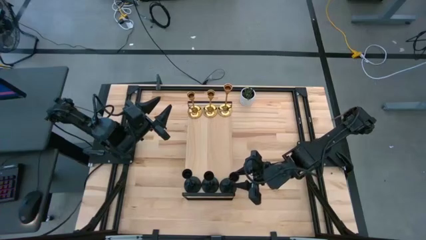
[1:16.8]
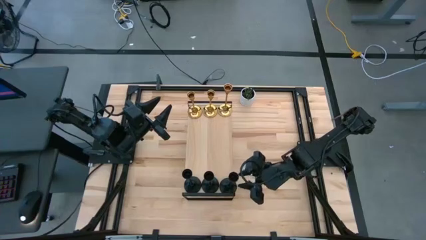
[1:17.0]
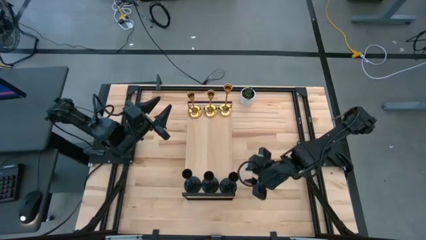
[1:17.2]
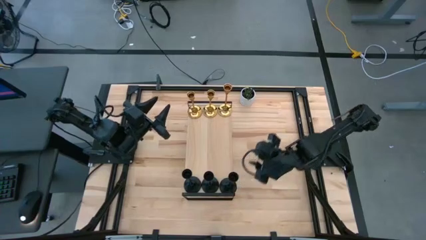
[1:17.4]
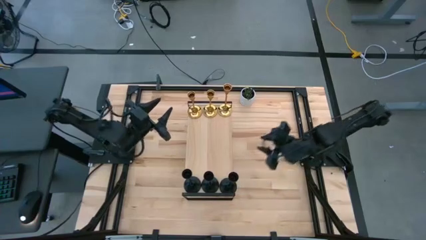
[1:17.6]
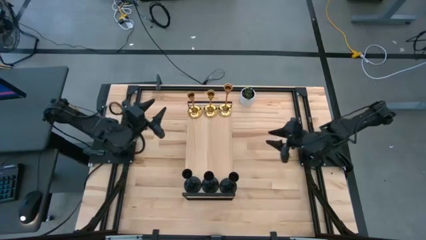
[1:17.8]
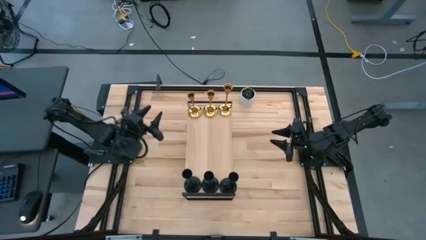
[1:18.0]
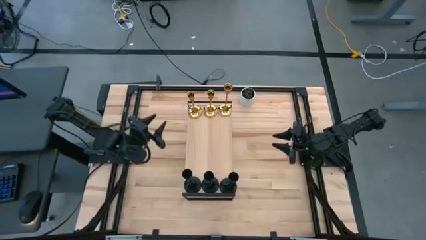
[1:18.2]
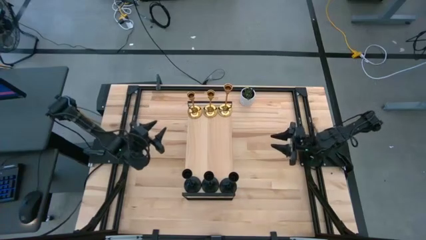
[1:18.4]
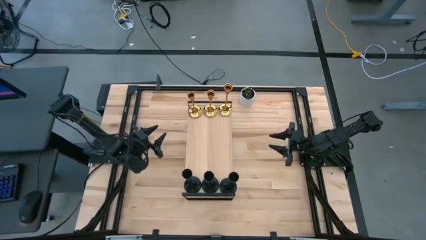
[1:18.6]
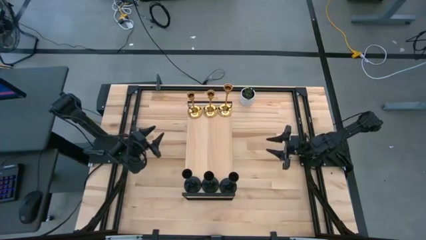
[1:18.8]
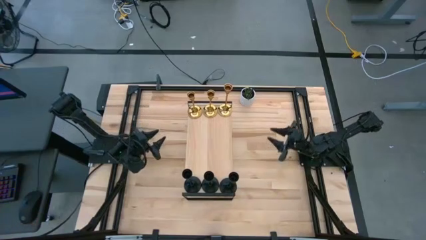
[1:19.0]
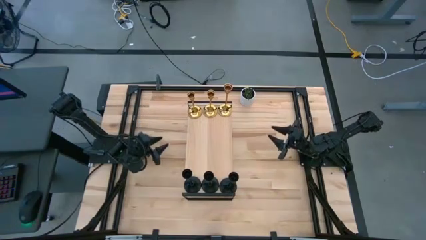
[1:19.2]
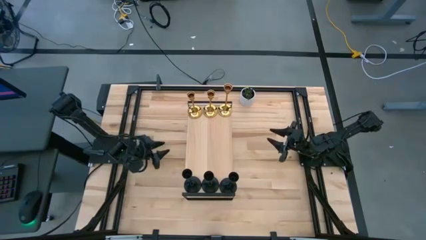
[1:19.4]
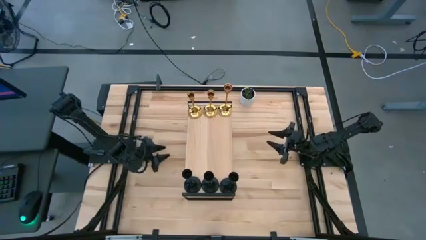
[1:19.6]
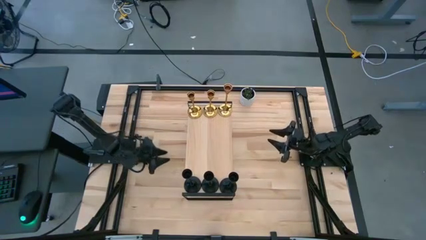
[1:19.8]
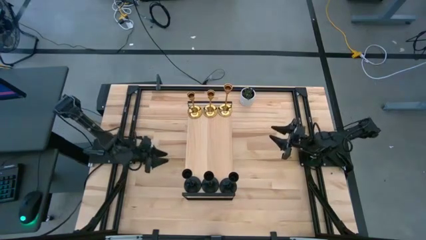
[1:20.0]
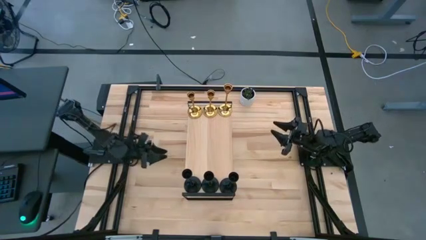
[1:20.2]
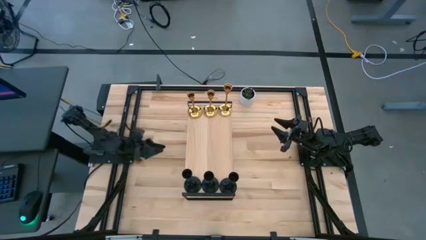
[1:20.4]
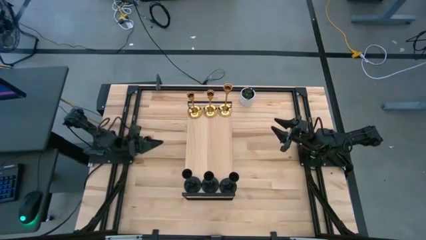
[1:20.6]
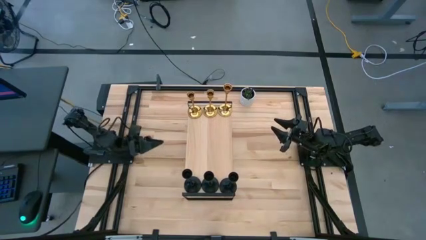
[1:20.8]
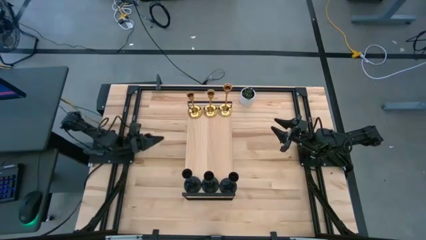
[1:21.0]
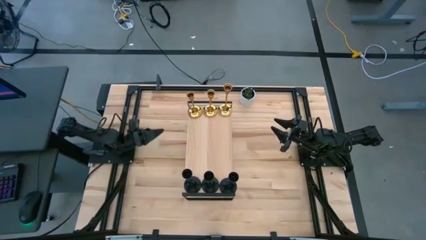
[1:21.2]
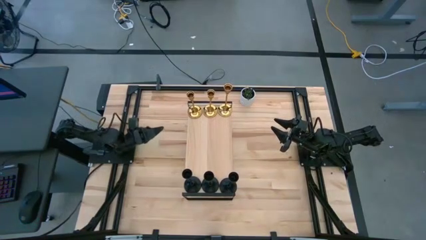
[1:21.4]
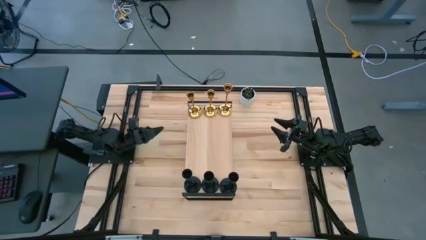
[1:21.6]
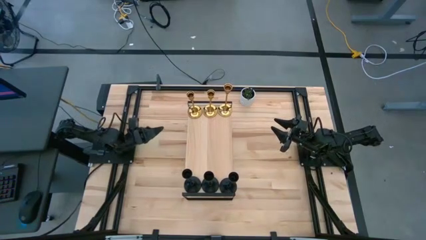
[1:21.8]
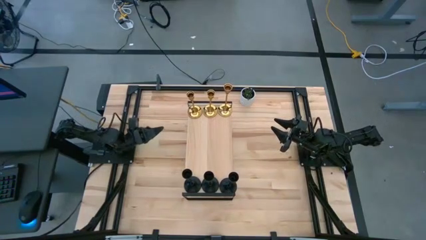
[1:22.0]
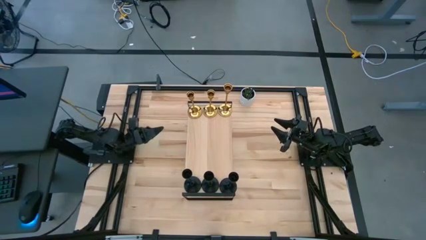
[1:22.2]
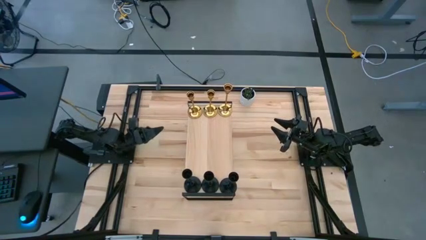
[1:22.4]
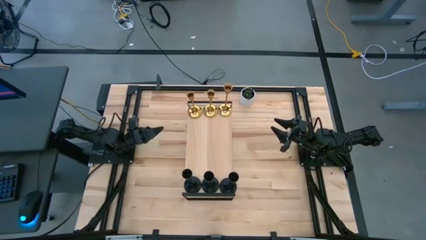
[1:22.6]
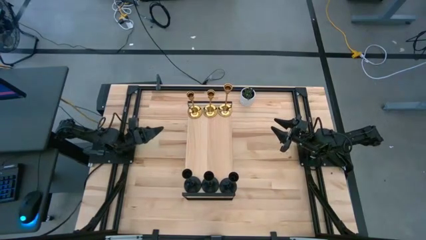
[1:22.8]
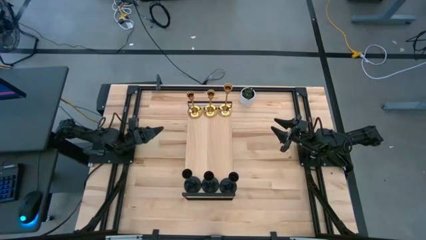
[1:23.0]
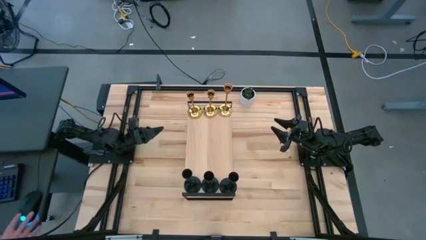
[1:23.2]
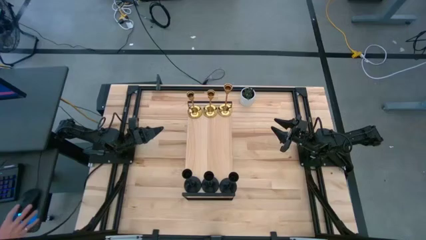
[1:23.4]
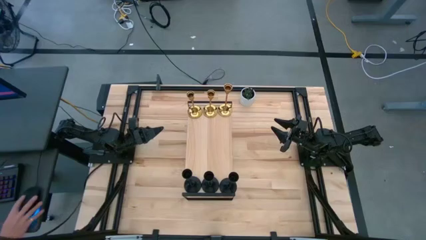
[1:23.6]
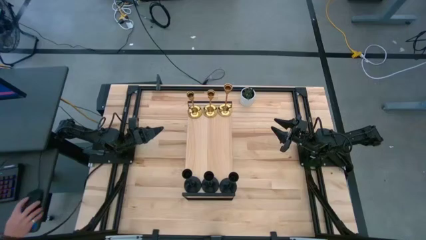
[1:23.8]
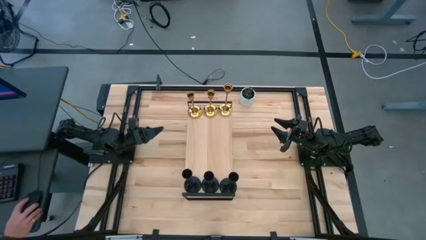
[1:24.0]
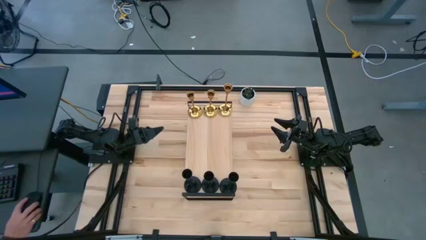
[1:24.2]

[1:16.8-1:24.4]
Task: Pick & Place candle stick holders
Return to Home Position

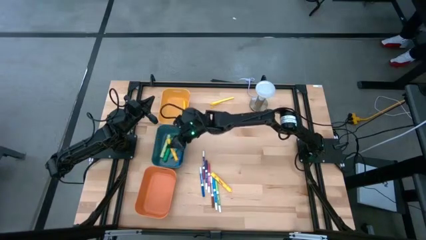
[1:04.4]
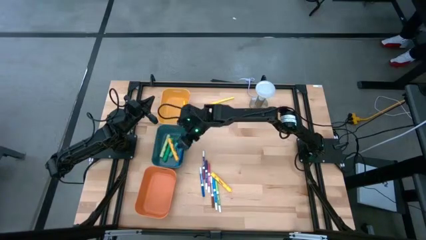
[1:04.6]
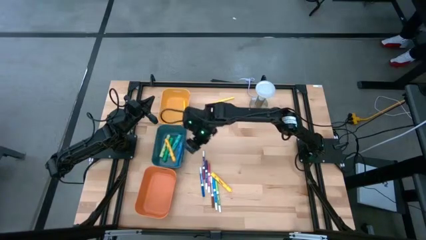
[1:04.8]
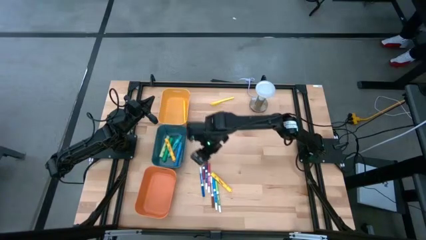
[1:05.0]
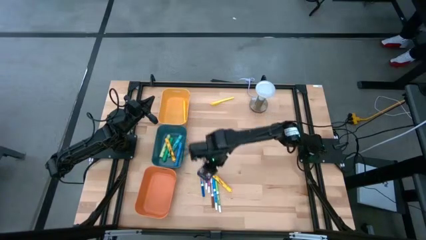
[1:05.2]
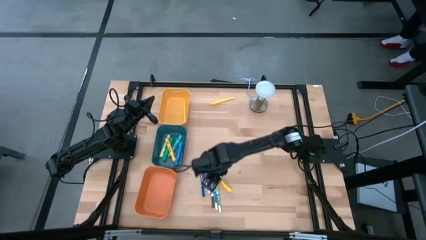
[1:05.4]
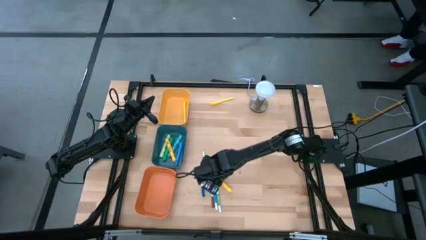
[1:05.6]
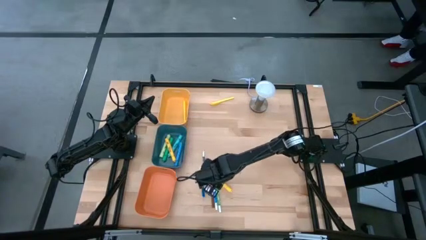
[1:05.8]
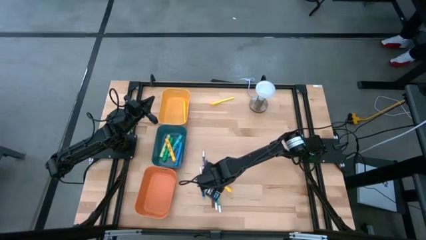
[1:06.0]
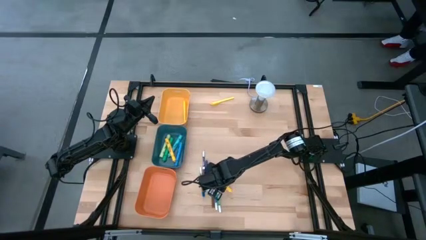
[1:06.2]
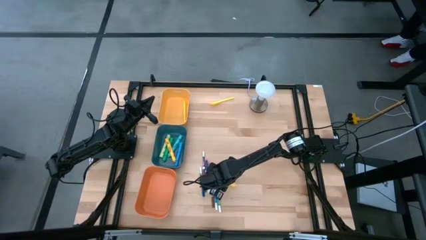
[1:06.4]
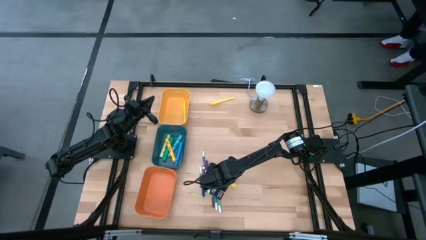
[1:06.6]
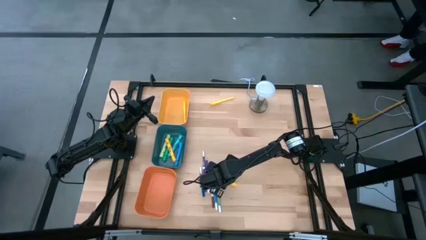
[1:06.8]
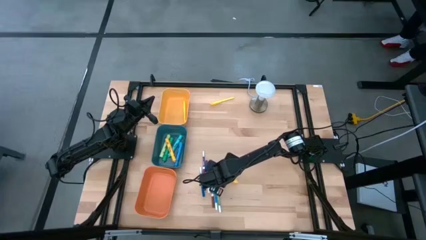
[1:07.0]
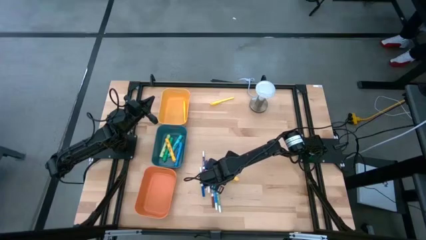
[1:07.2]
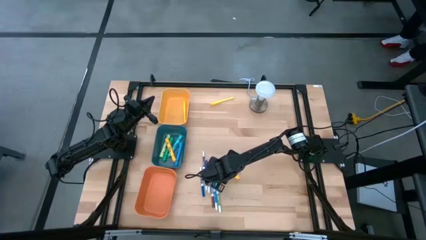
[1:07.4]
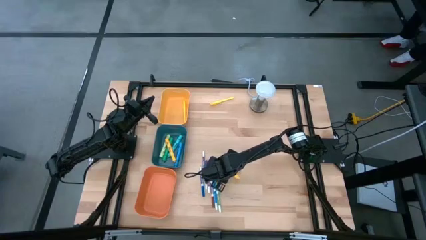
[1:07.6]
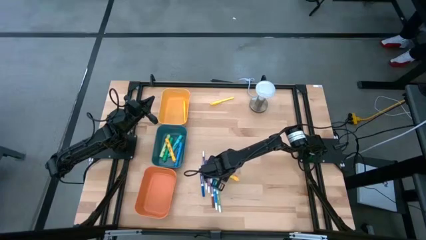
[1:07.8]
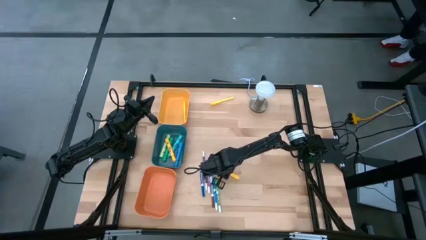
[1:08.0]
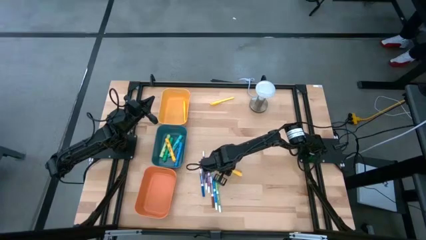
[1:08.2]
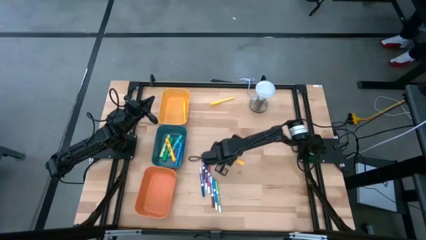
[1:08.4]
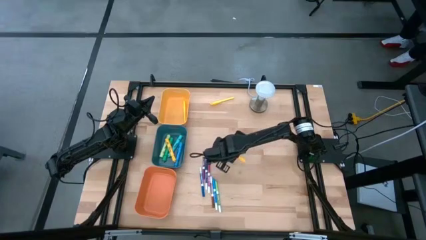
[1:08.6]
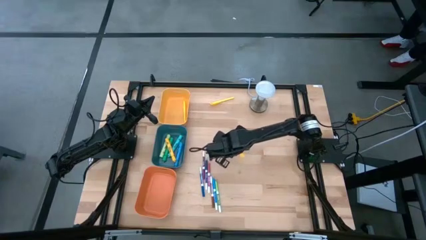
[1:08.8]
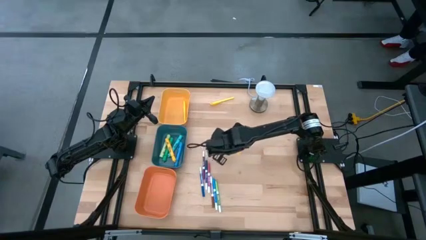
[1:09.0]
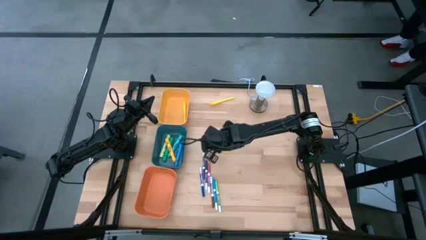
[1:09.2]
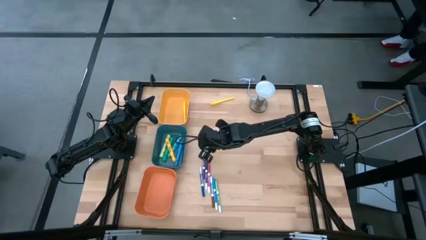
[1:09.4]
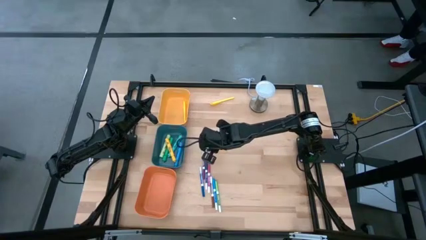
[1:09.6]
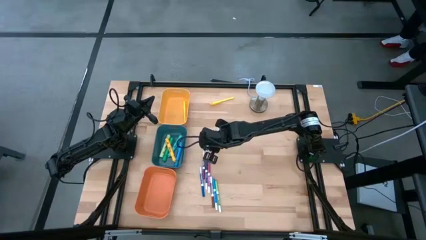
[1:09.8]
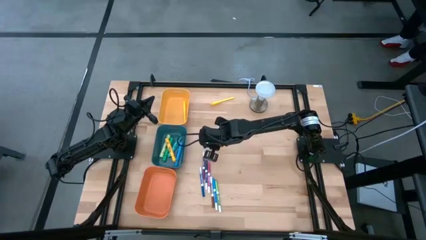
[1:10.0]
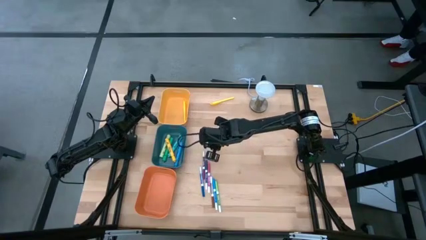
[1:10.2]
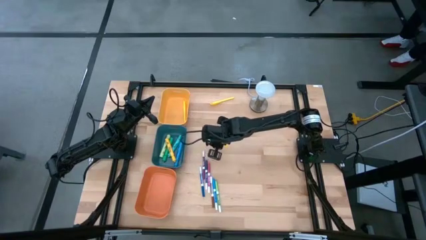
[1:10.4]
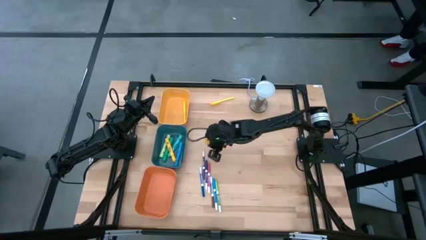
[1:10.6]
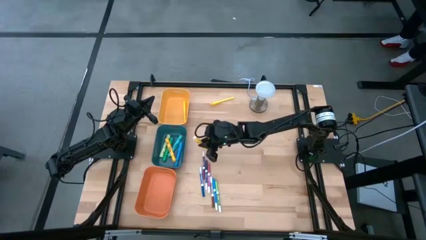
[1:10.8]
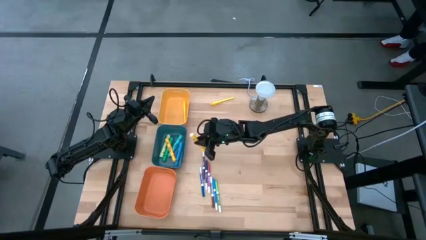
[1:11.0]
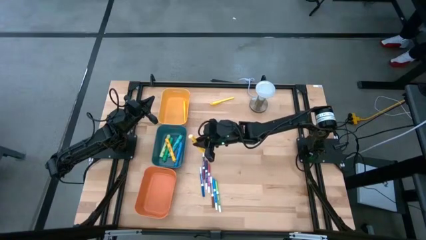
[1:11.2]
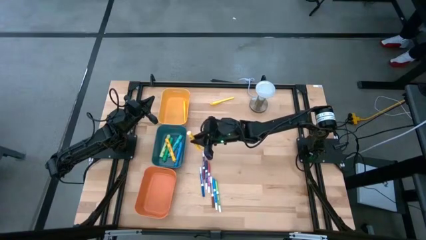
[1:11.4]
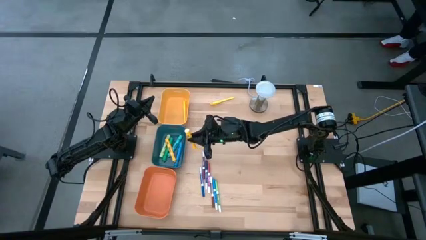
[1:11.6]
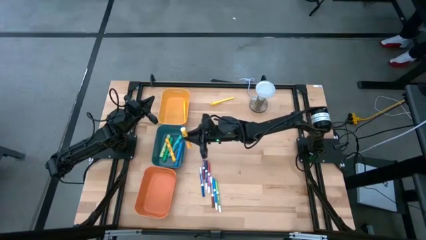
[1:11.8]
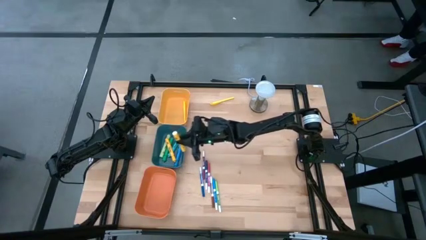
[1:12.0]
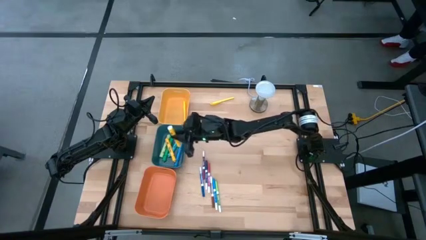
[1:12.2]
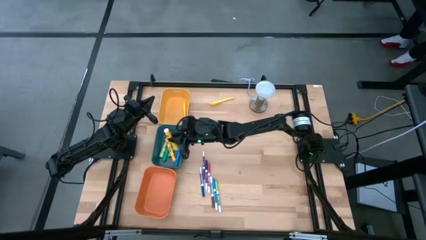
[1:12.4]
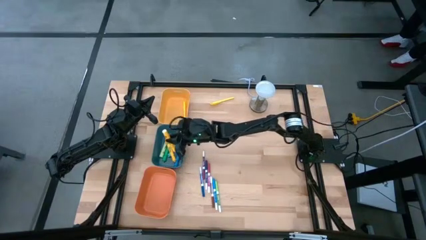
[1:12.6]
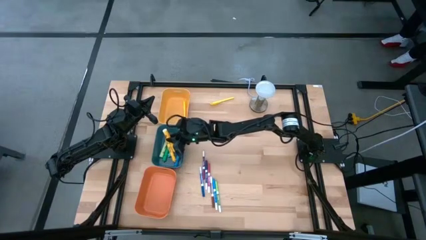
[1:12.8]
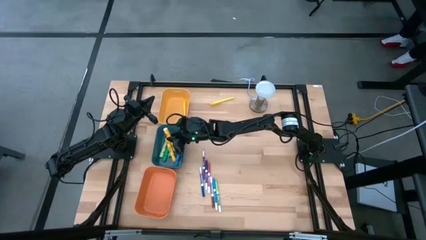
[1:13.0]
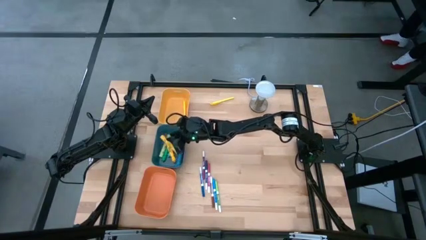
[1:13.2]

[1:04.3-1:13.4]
Task: Pick & Place Markers
Put the yellow highlighter pen into the blue bin
